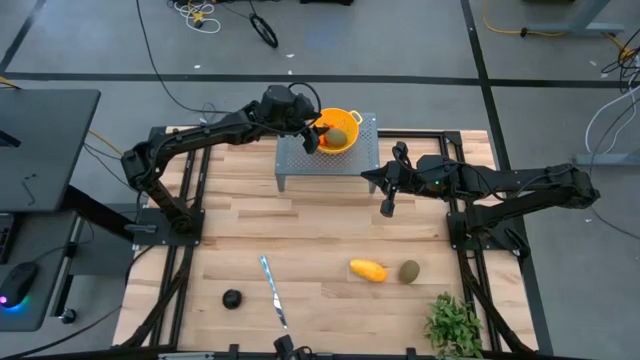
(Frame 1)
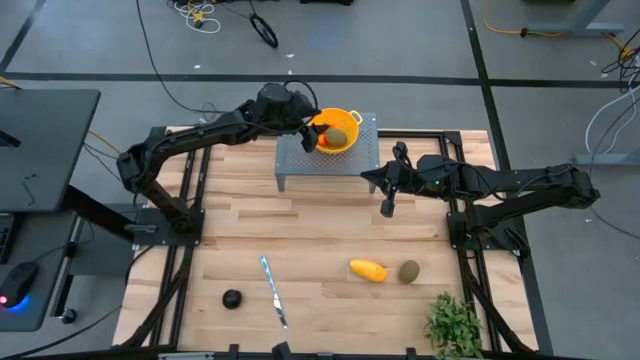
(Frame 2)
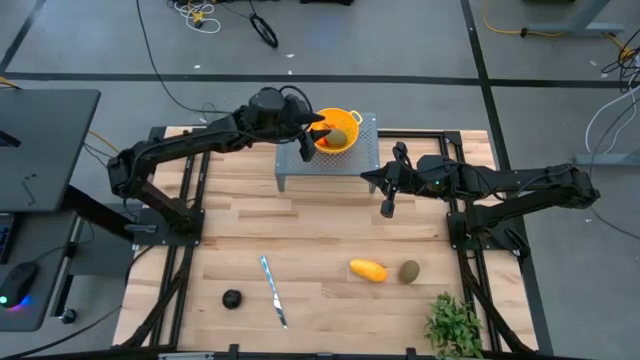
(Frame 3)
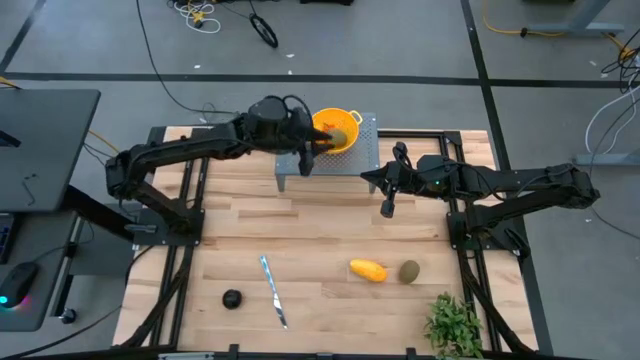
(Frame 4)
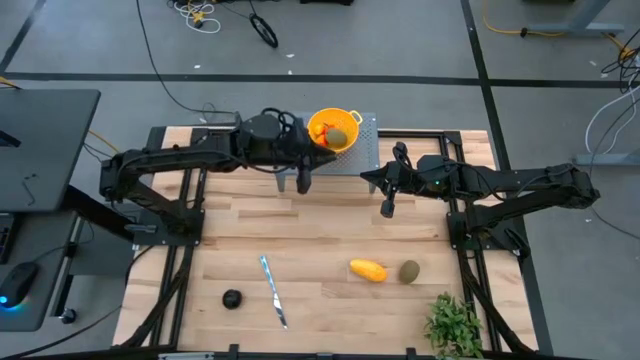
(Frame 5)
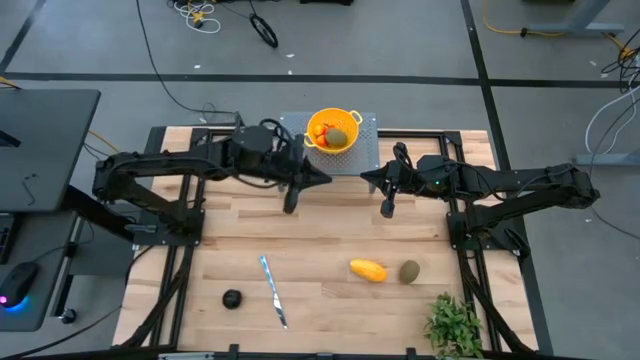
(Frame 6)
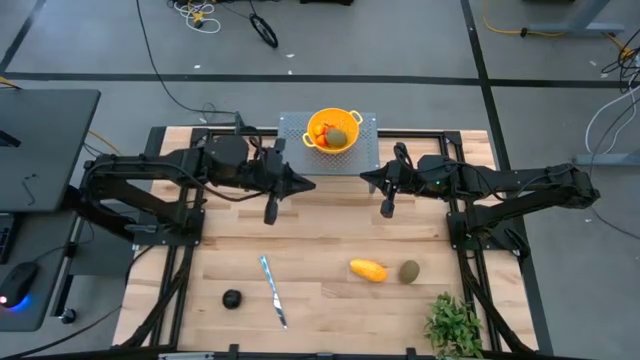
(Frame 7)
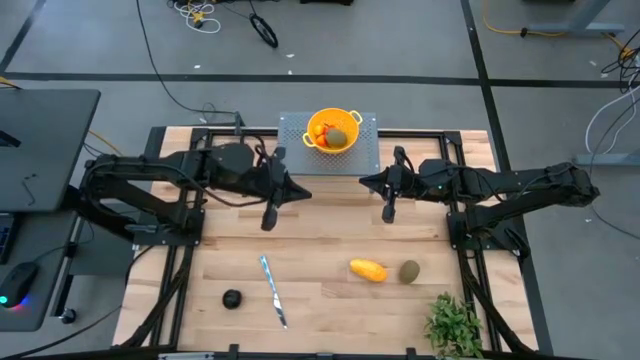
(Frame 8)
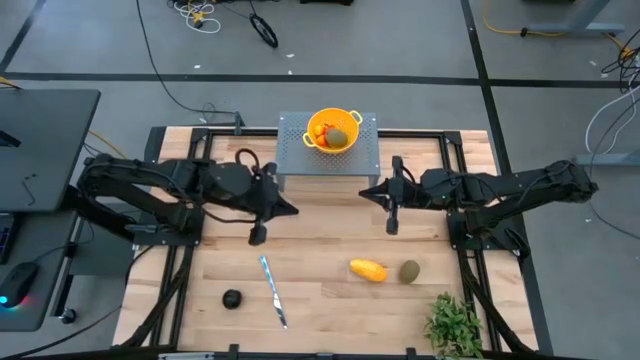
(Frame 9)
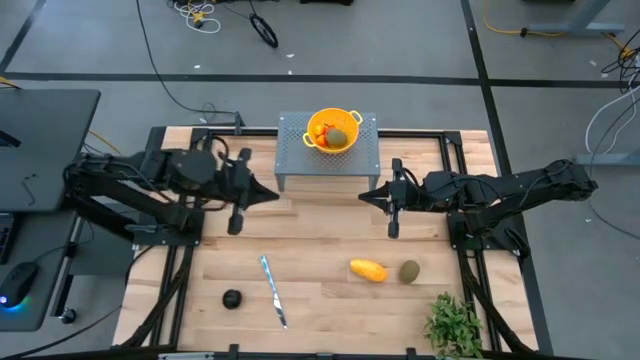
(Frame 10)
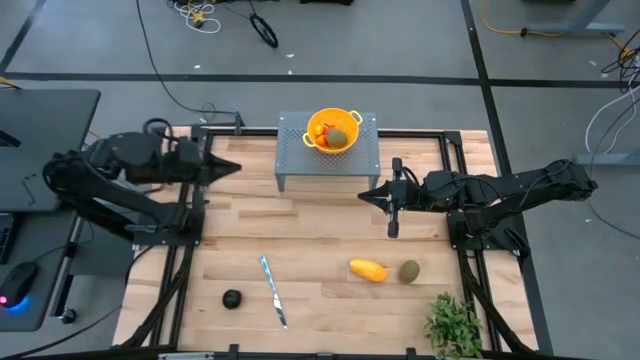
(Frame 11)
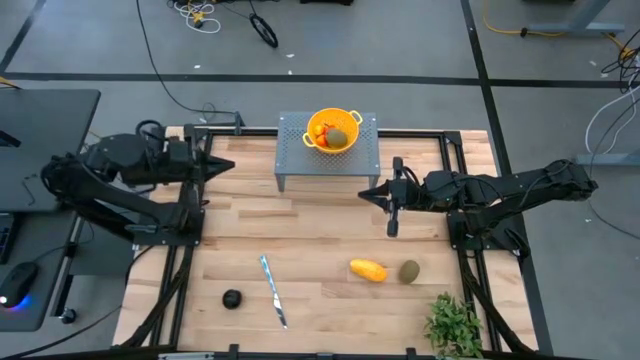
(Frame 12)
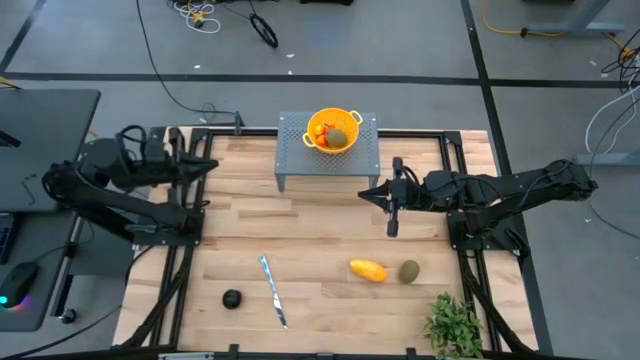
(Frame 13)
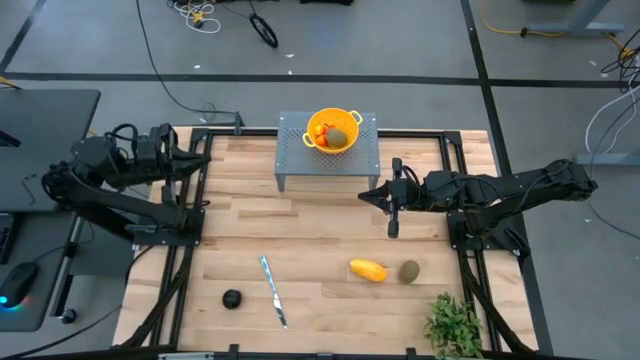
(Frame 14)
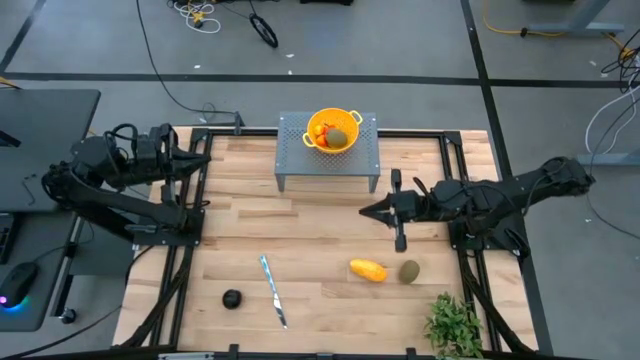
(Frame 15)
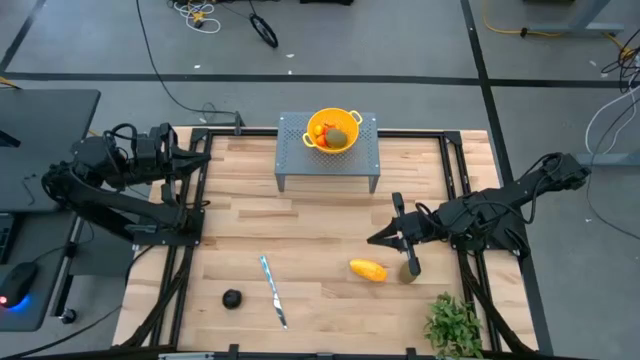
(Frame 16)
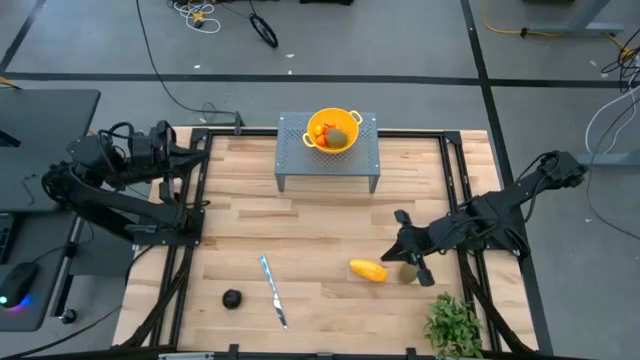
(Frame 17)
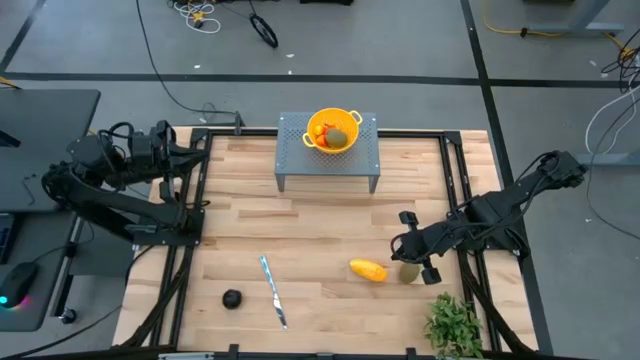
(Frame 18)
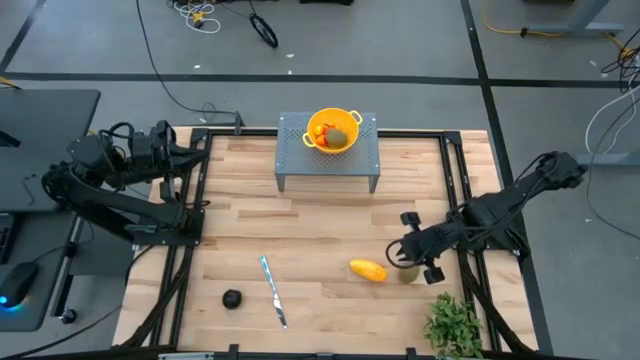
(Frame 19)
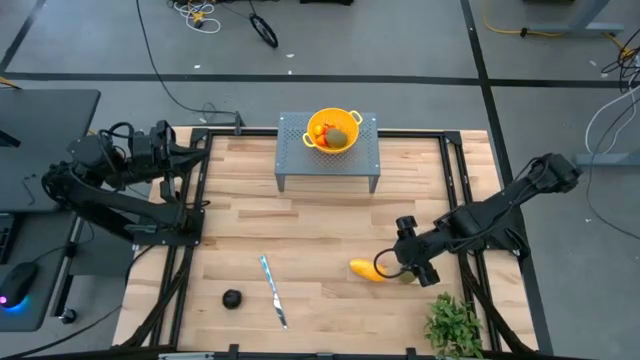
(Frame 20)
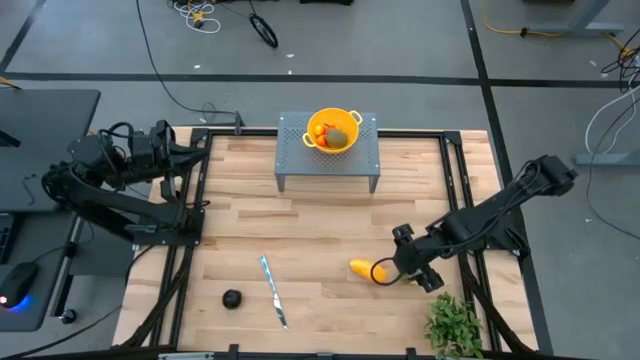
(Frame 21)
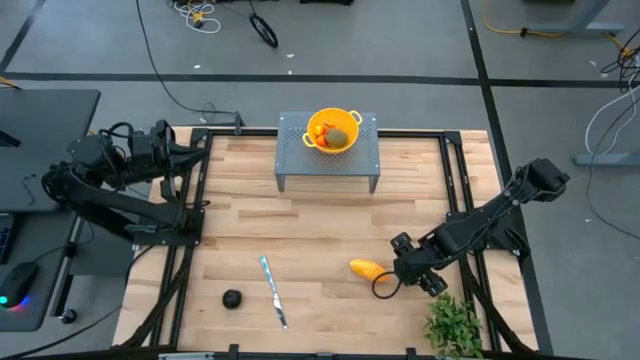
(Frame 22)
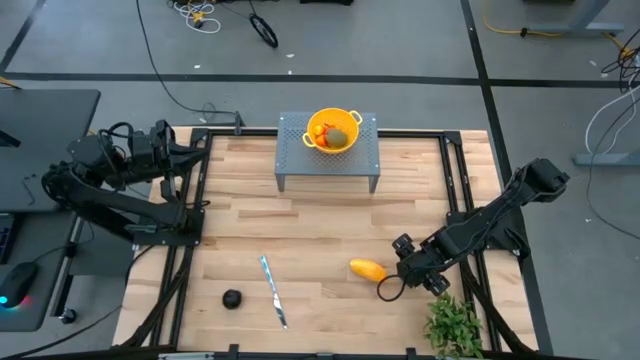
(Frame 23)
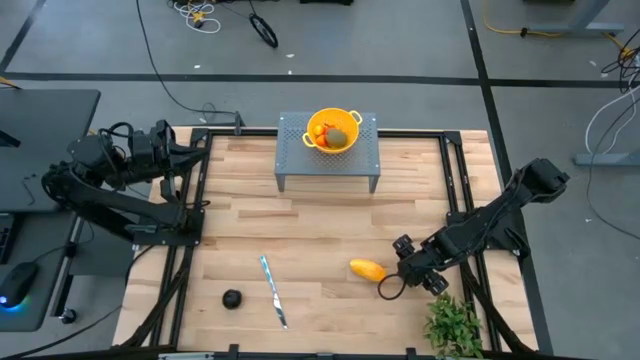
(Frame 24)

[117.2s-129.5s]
Task: Pick & Place Fruit
Put the kiwi into the yellow colander bowl on the shelf

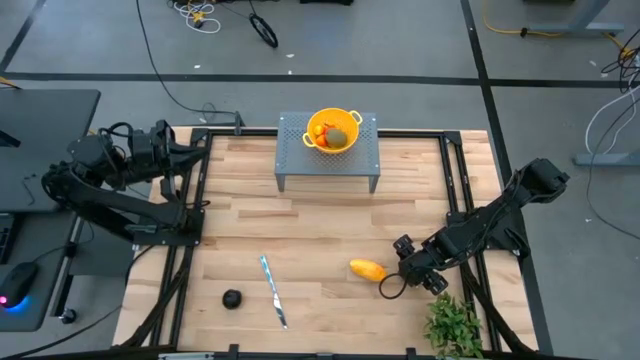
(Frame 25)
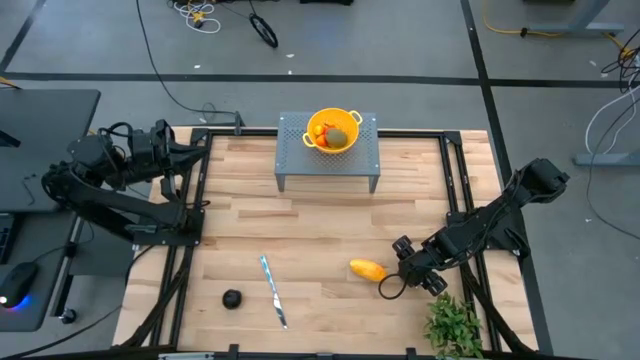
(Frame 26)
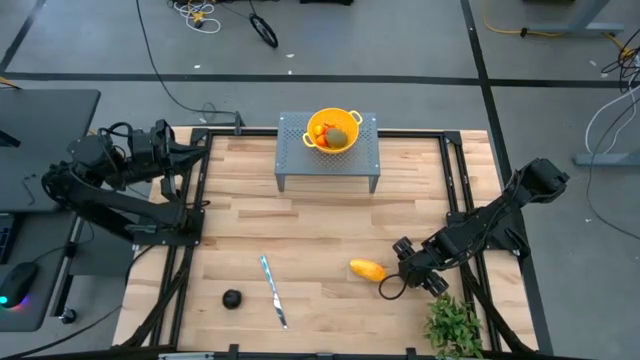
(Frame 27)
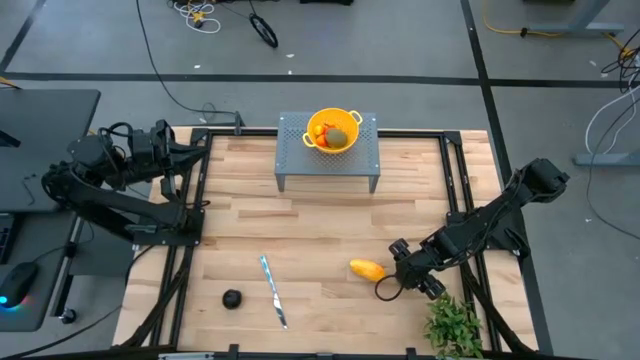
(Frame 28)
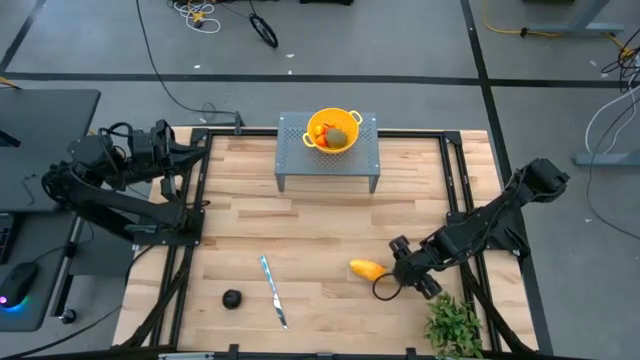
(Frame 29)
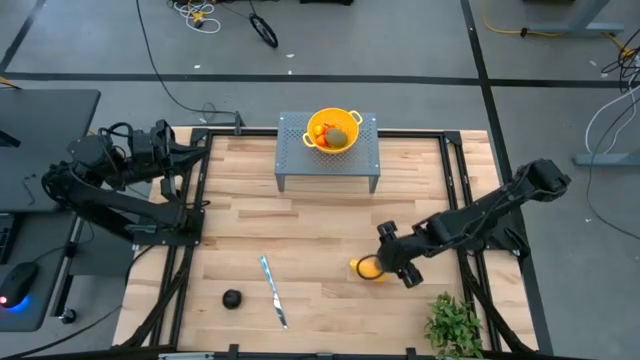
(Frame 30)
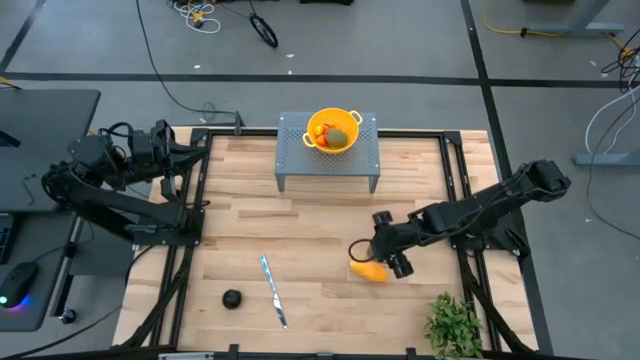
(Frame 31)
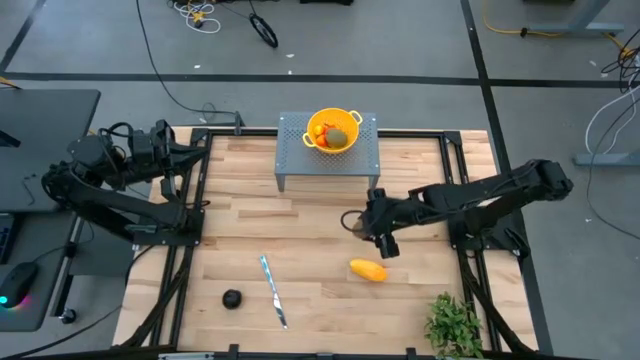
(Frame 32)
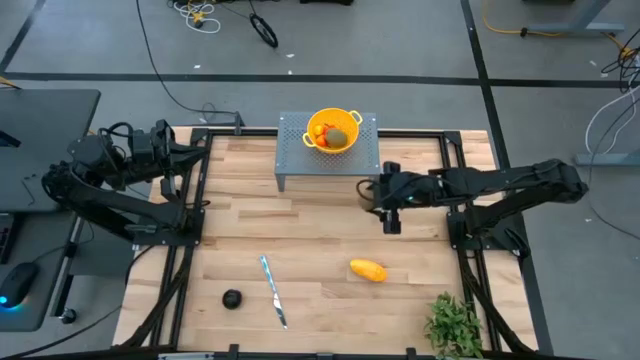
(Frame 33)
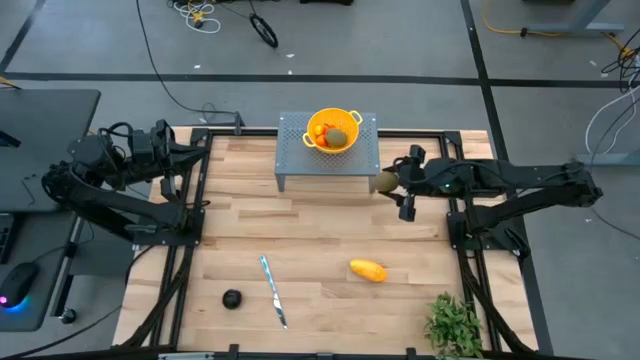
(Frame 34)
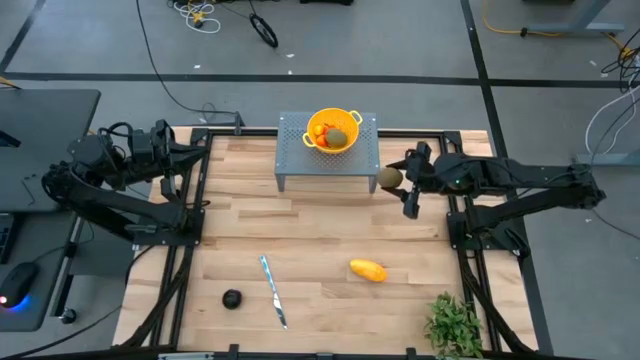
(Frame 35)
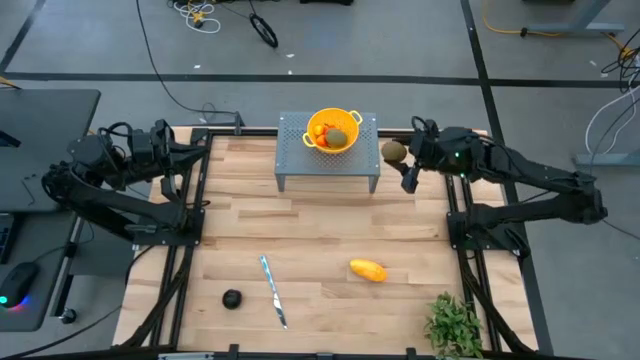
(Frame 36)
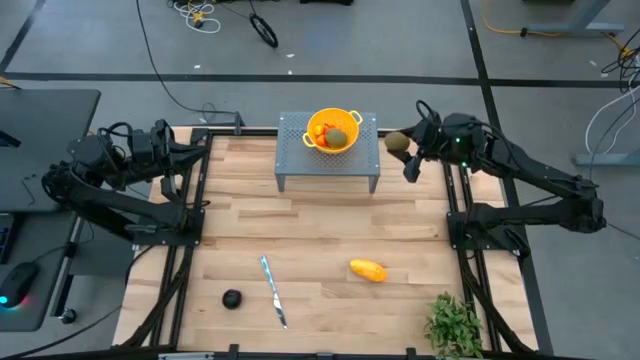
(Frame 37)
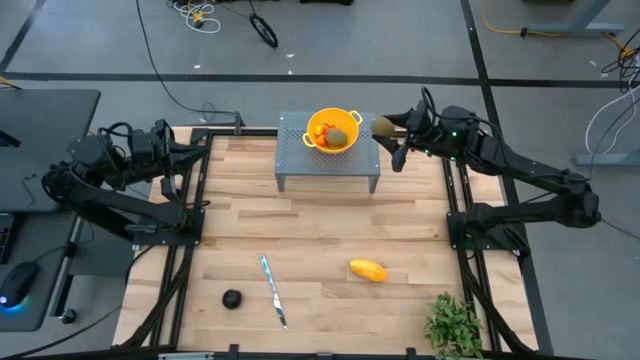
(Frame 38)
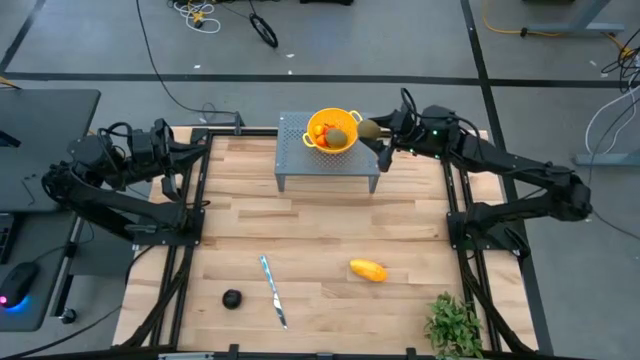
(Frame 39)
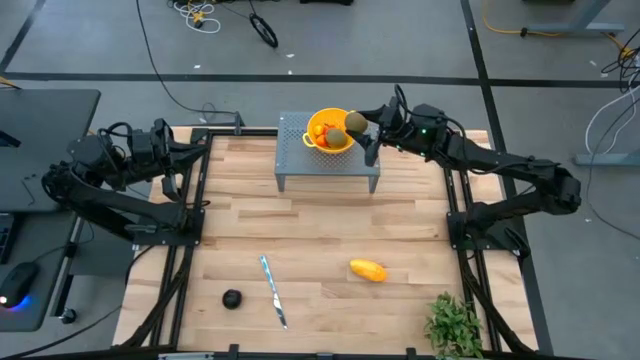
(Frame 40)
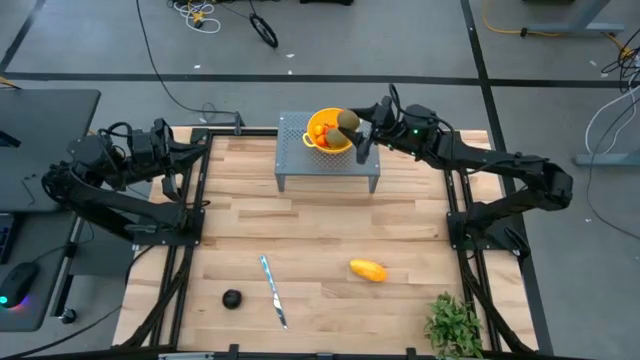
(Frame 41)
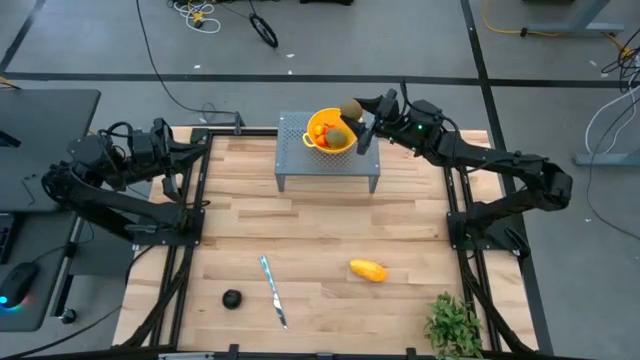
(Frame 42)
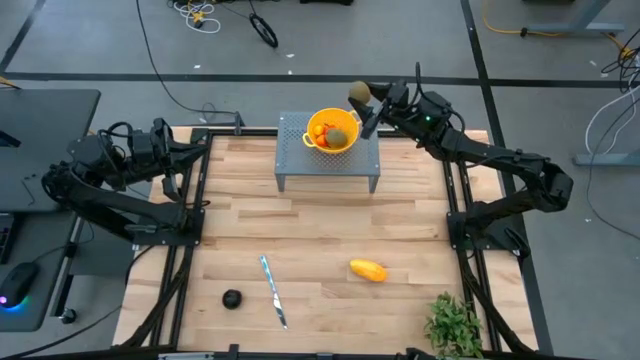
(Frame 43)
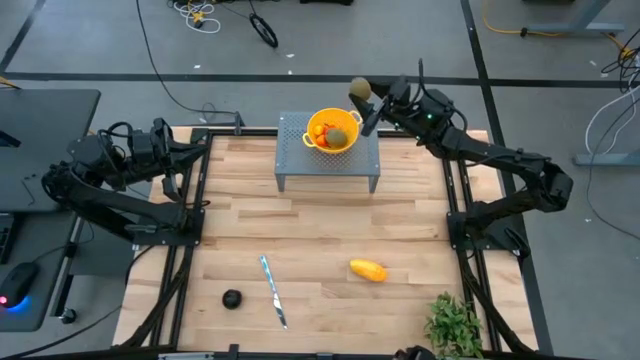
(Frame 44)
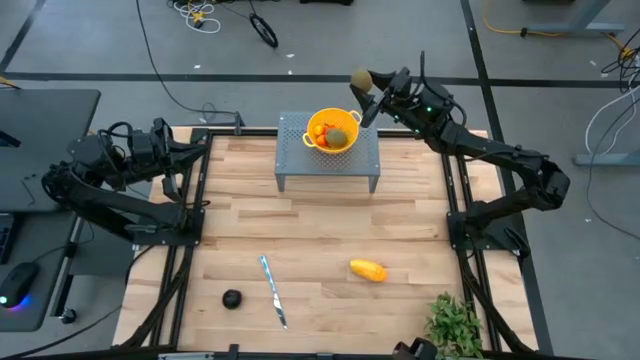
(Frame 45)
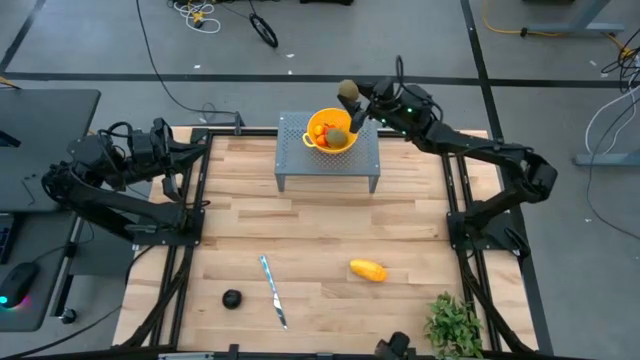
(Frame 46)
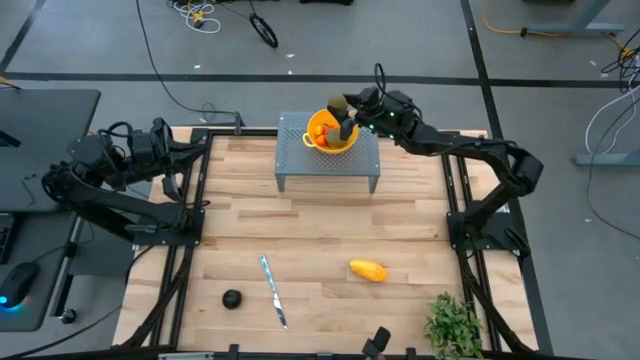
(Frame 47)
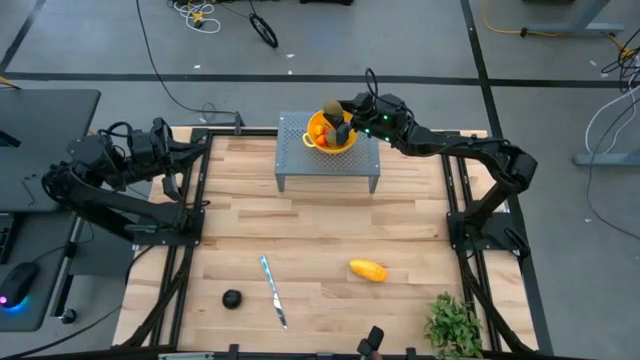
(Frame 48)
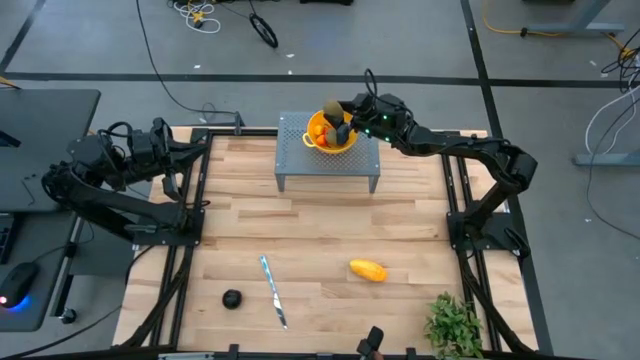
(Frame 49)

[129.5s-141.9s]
Put the kiwi into the yellow colander bowl on the shelf
